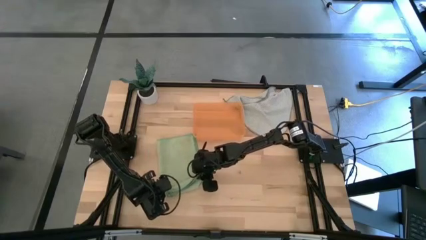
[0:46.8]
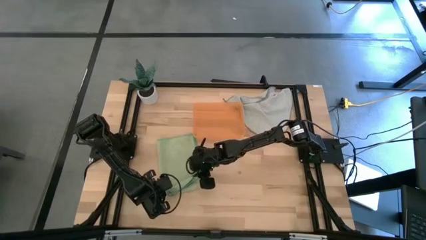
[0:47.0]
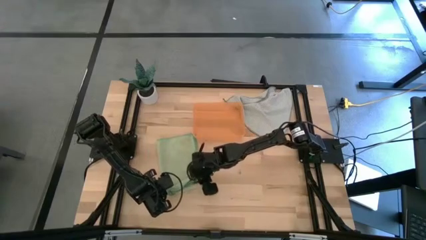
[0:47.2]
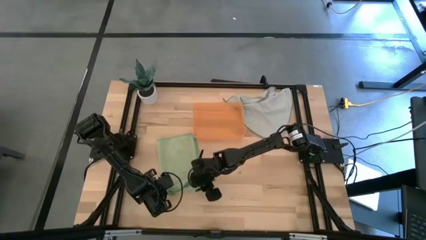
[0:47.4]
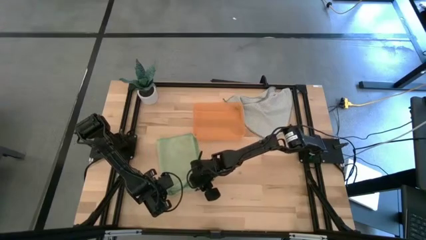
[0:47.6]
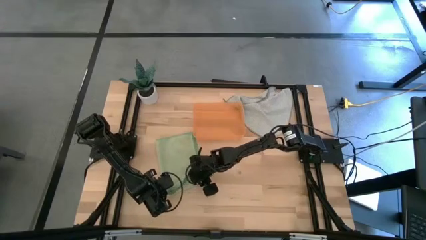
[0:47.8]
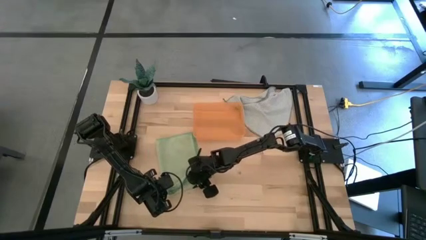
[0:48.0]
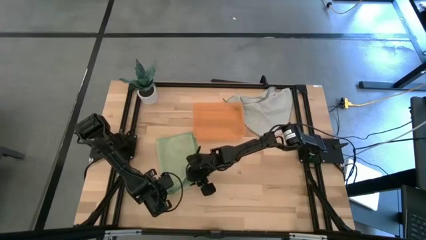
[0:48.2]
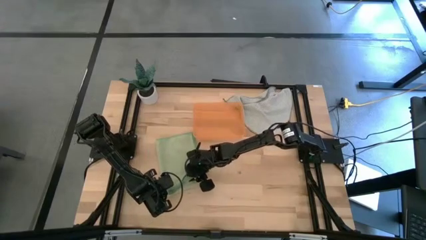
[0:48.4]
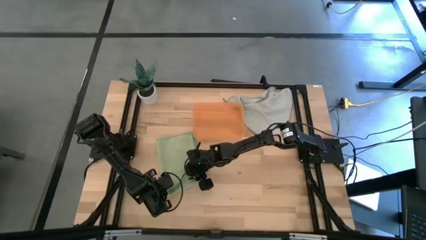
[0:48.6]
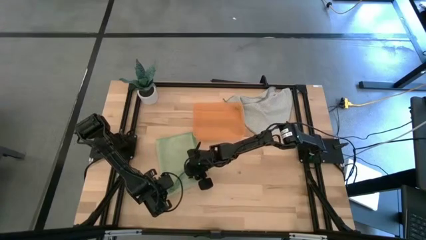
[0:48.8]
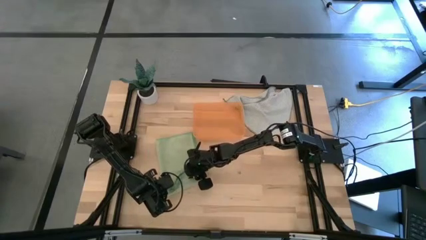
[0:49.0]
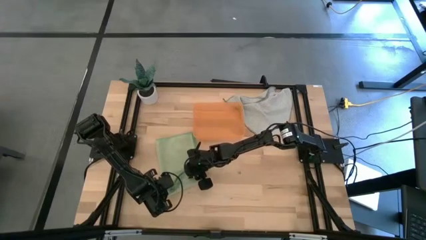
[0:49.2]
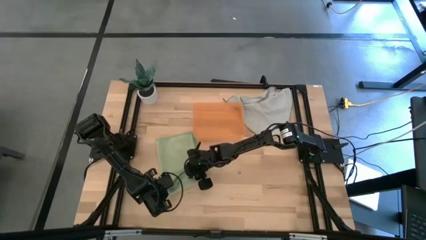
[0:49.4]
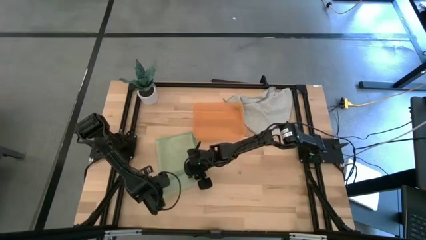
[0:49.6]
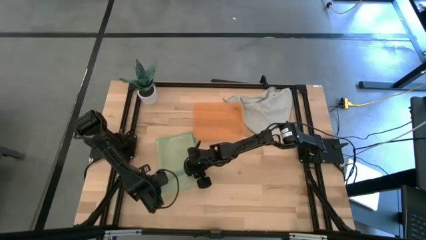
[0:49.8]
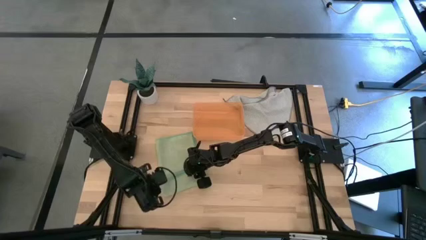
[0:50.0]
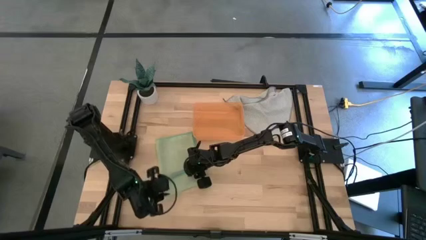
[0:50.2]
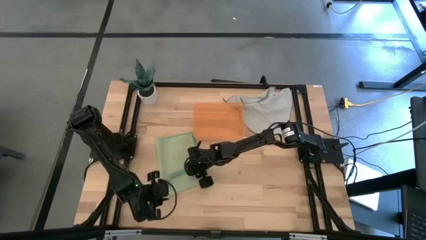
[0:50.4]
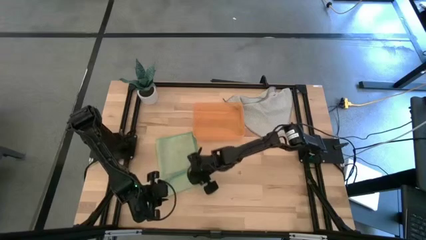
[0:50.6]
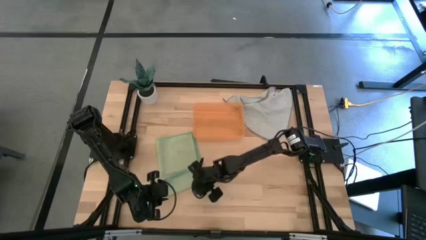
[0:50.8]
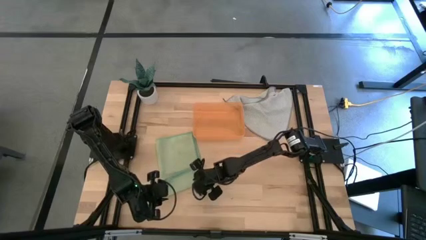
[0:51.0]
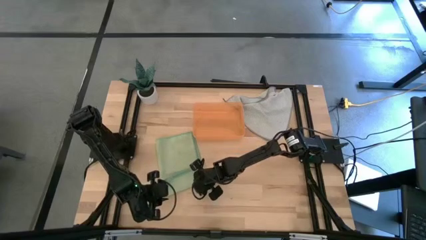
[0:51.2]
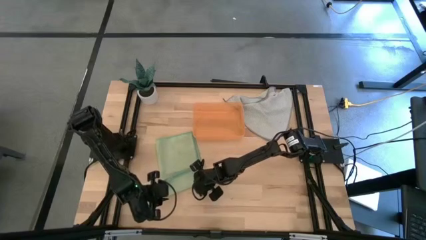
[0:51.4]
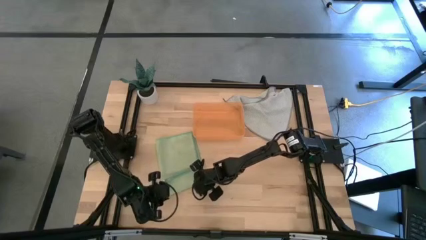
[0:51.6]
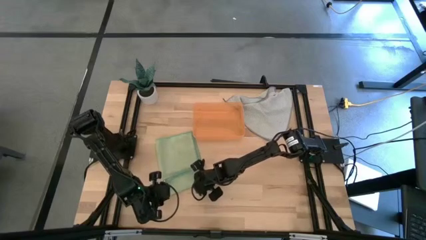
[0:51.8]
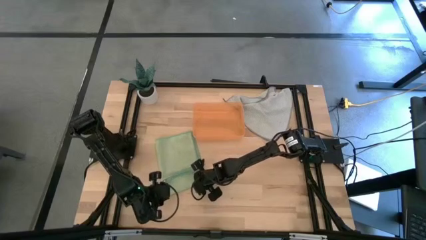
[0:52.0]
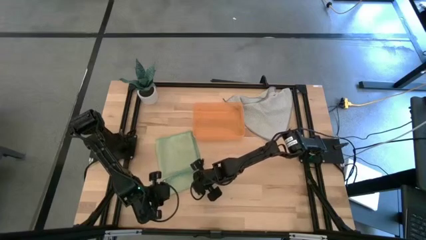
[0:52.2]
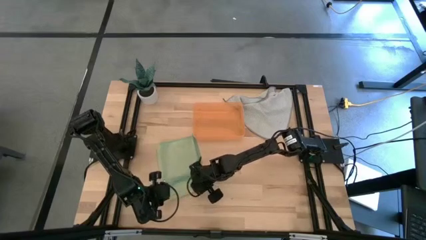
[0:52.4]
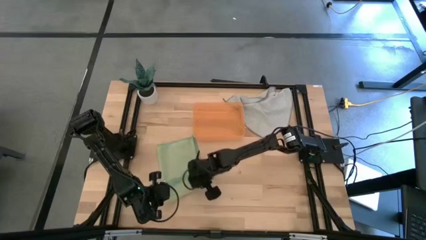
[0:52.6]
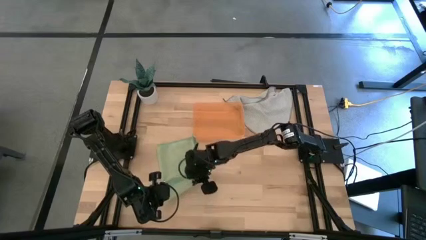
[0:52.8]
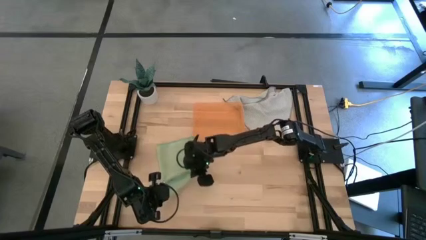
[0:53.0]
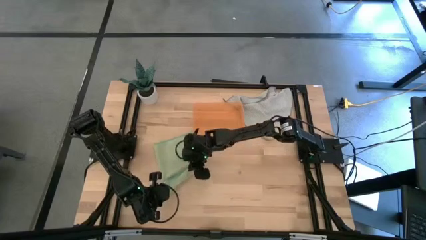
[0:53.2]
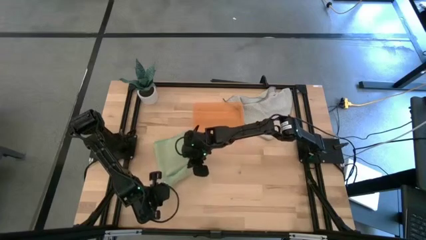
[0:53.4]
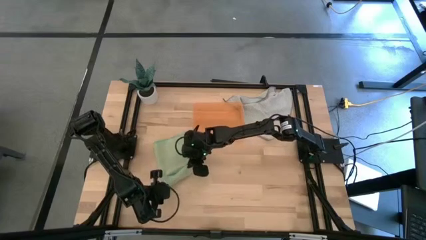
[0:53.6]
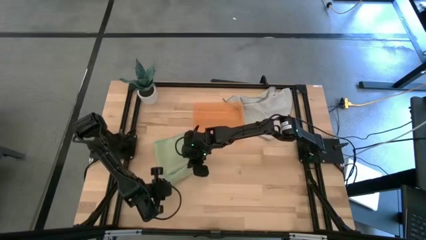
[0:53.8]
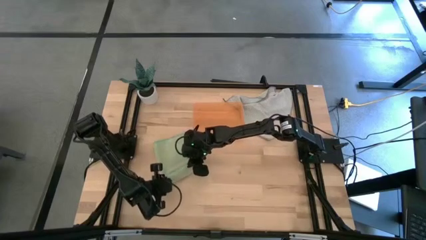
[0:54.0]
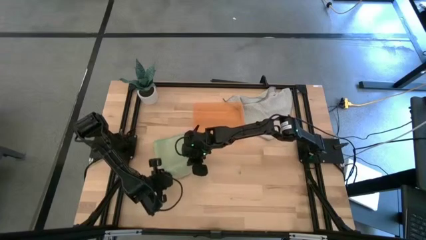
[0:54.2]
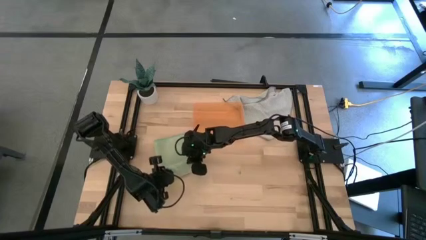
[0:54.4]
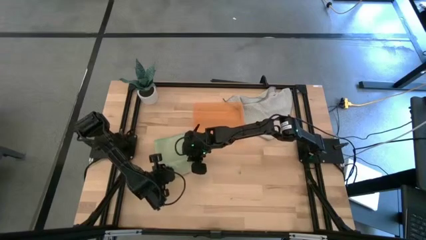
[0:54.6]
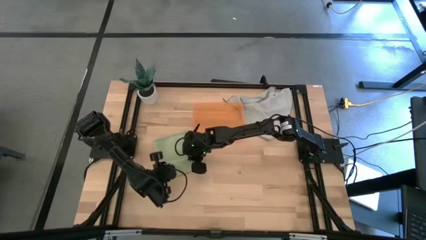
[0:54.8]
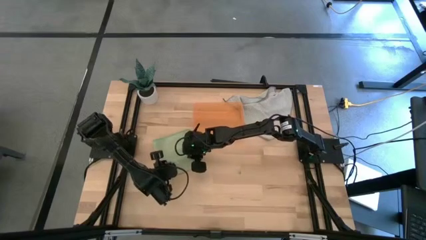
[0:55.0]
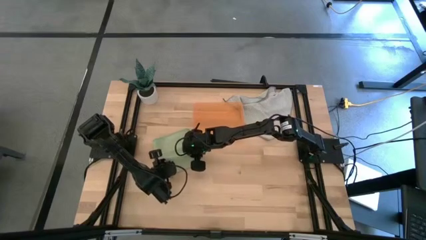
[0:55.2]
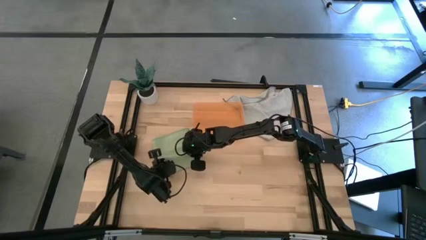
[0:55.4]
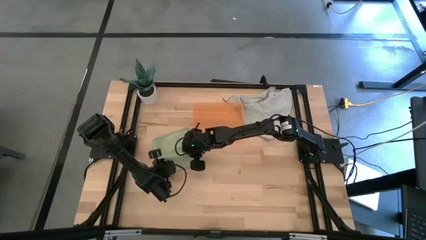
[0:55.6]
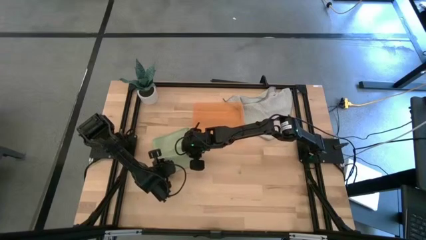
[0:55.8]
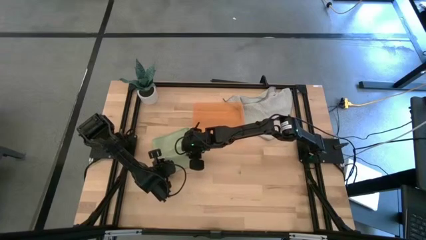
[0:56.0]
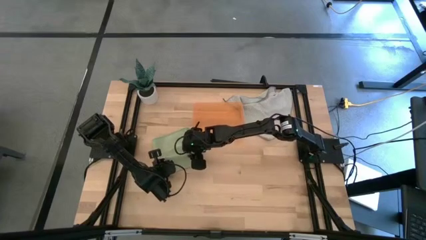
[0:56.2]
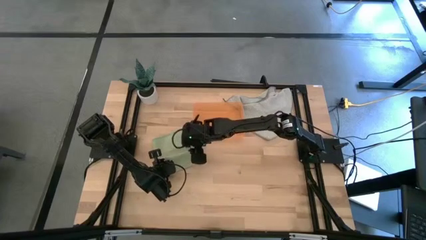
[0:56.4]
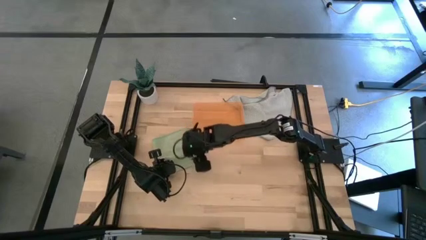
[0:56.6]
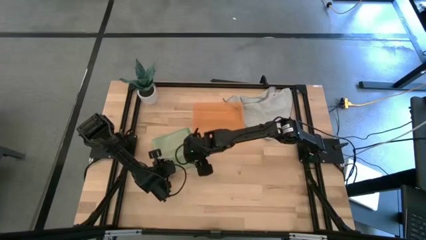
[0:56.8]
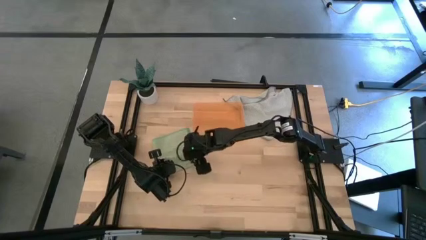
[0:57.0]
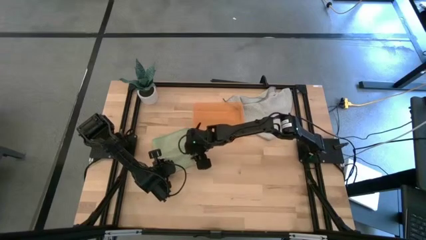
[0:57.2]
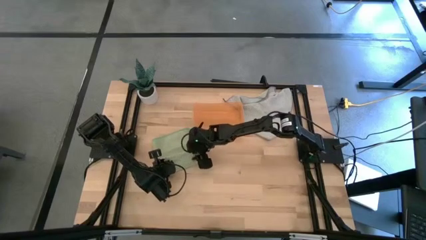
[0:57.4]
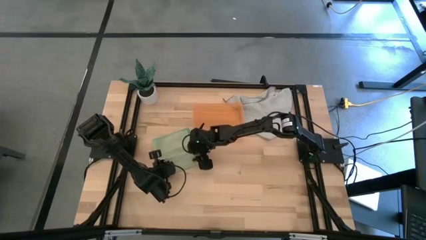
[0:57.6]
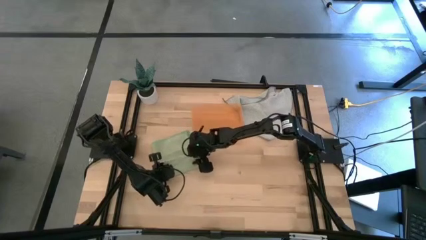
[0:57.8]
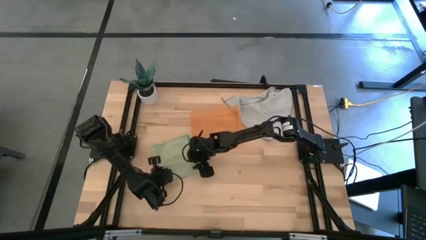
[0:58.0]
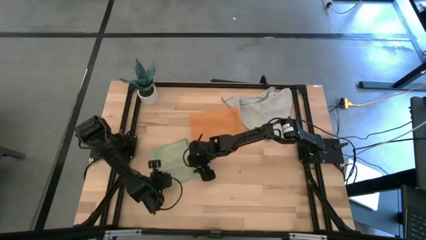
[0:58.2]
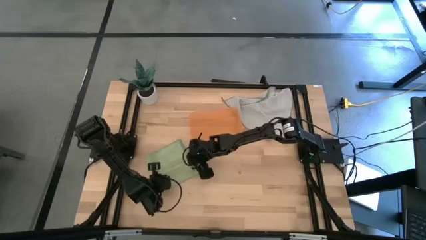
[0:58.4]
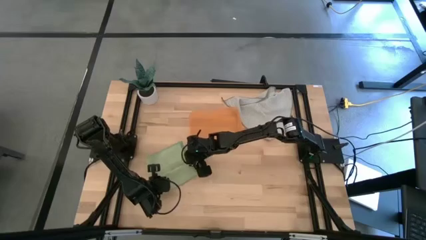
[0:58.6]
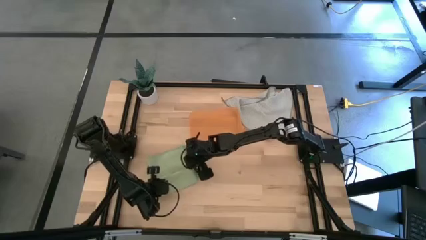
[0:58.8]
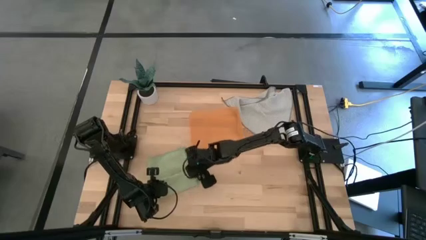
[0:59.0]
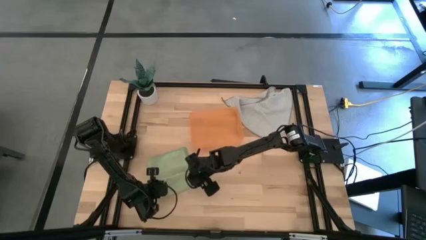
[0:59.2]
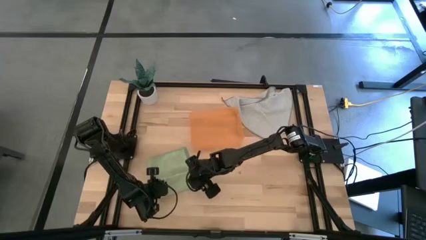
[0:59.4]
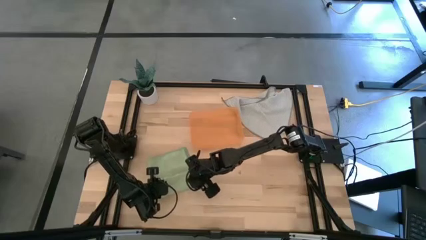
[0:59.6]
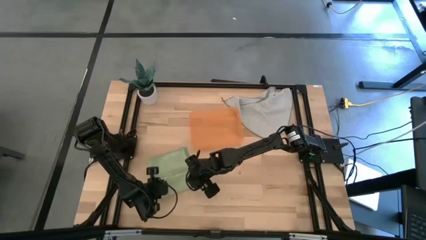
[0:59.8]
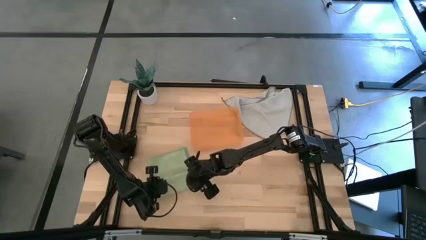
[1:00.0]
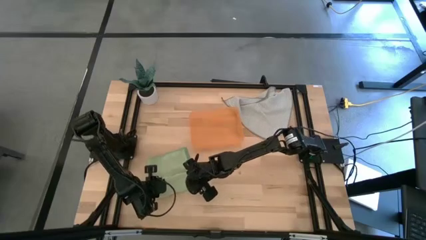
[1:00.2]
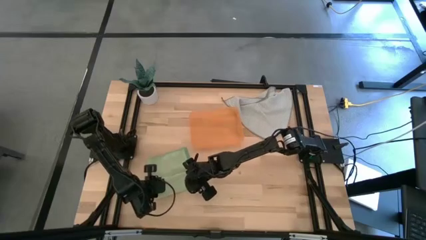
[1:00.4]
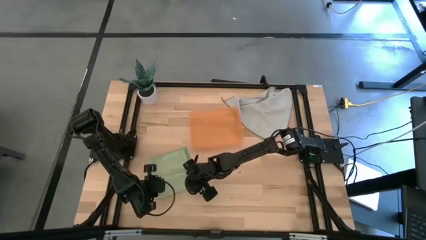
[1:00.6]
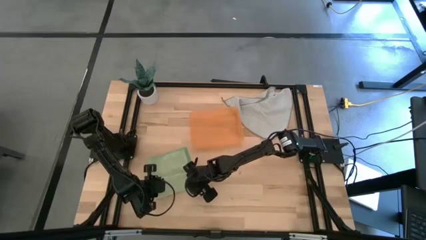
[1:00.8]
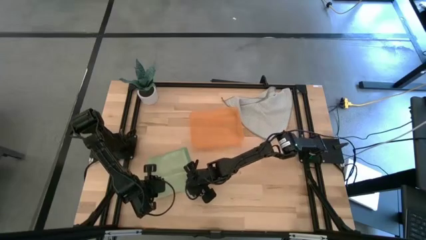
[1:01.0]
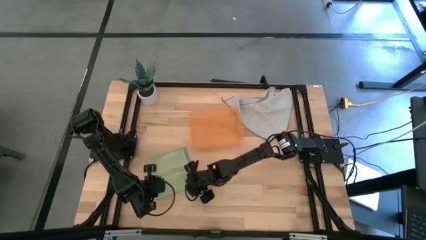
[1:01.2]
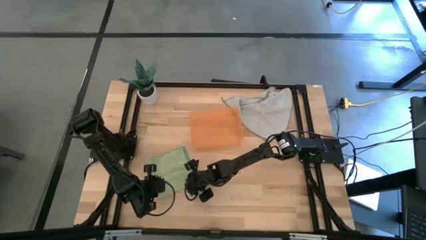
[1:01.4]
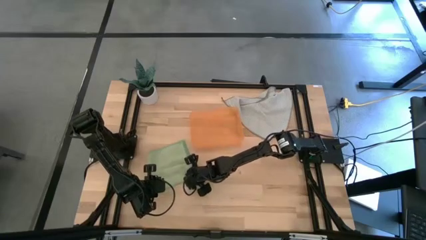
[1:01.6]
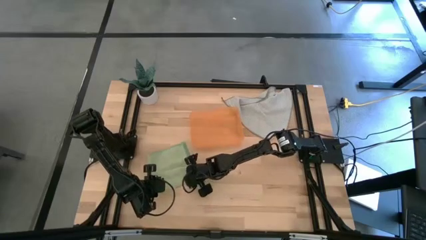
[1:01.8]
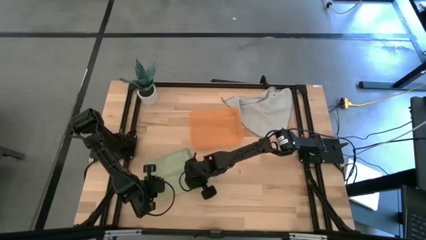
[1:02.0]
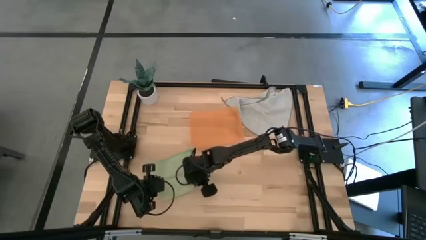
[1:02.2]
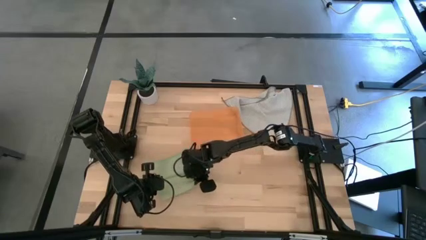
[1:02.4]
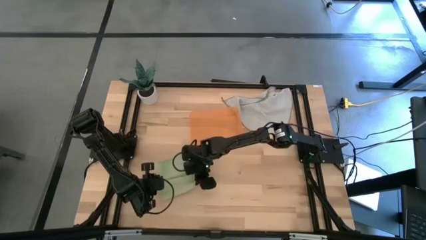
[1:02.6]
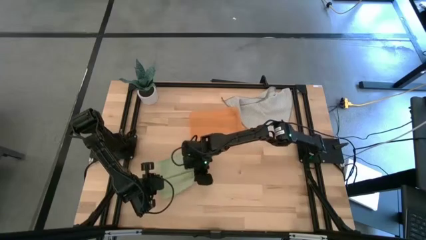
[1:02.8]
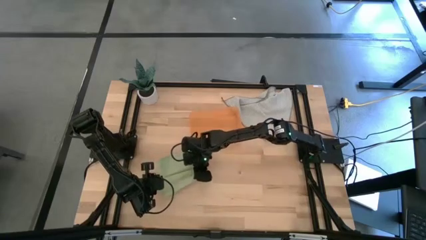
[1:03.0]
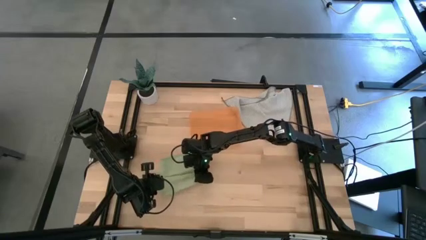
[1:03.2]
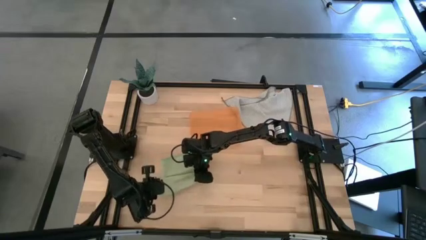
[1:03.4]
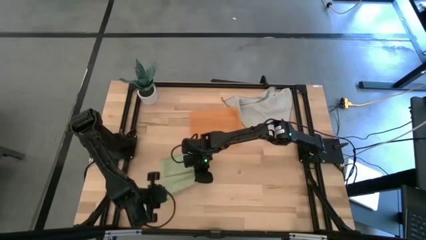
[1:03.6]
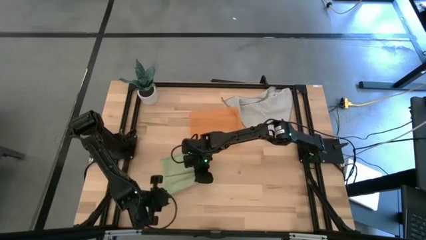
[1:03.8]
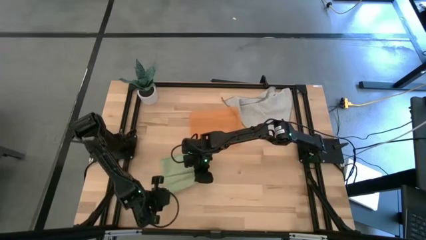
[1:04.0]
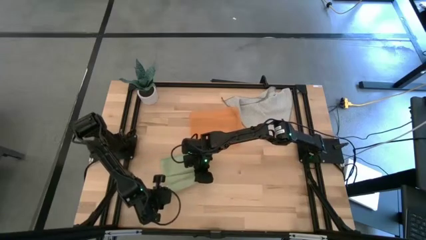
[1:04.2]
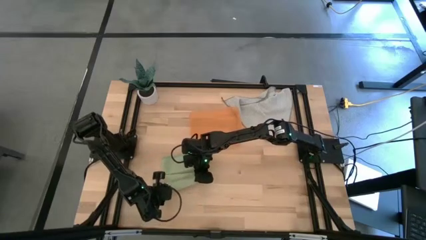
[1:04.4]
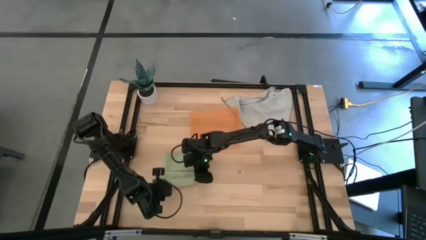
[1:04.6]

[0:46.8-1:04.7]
Task: Roll microfiber towels into tight, uniform cylinder then place into a basket
Roll the green microfiber towel
